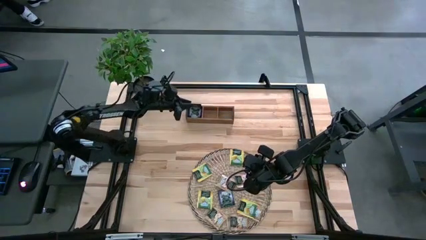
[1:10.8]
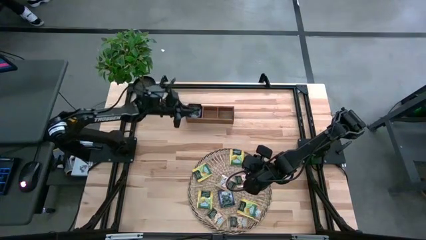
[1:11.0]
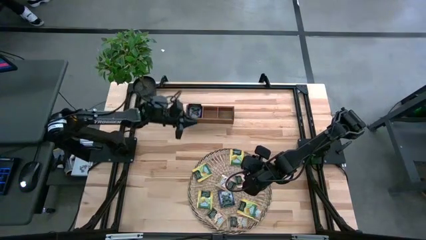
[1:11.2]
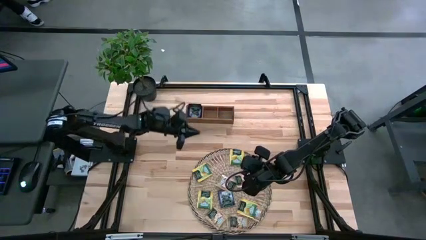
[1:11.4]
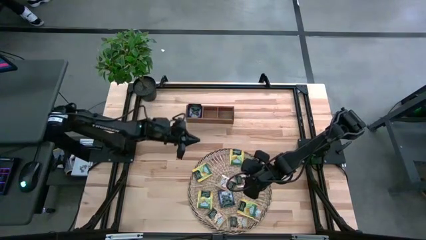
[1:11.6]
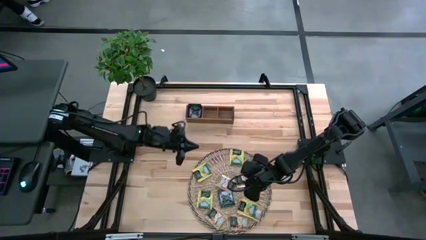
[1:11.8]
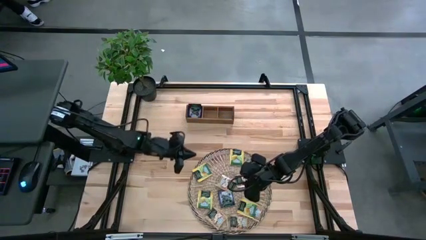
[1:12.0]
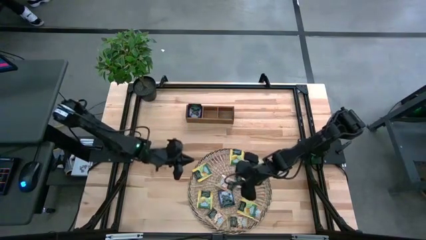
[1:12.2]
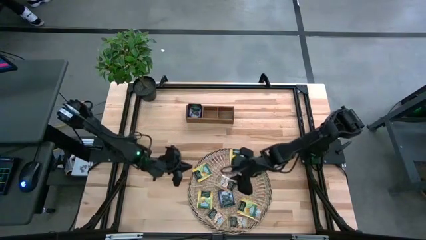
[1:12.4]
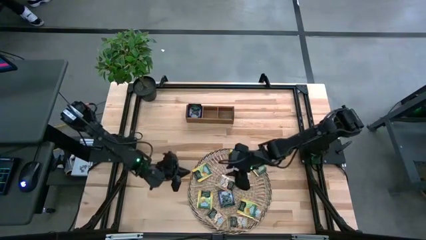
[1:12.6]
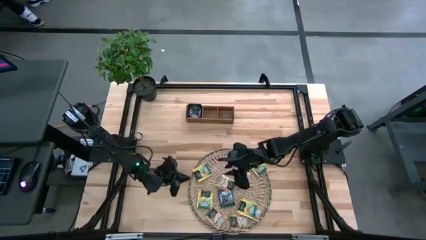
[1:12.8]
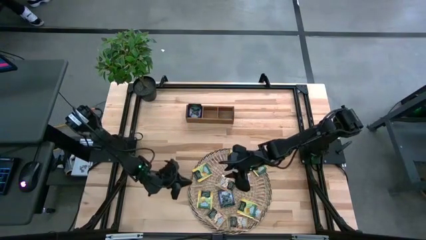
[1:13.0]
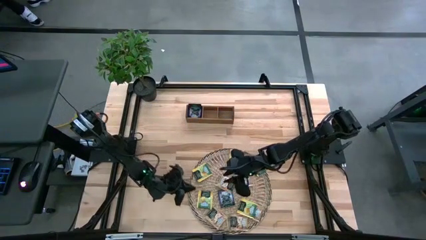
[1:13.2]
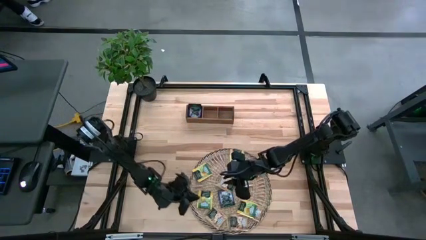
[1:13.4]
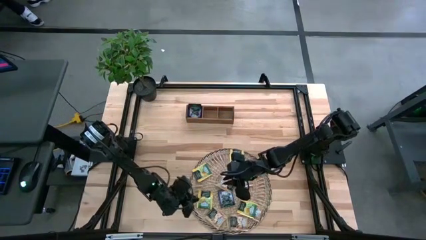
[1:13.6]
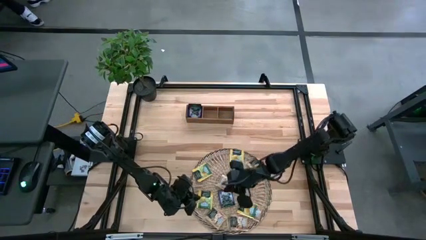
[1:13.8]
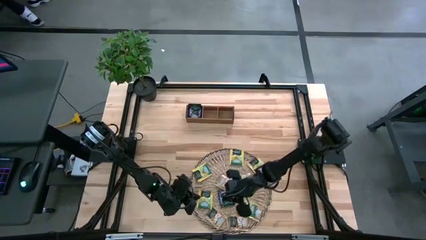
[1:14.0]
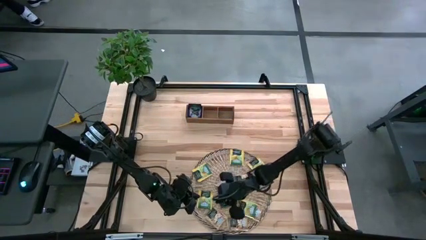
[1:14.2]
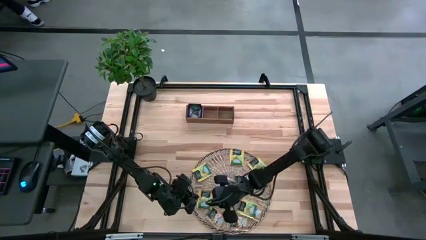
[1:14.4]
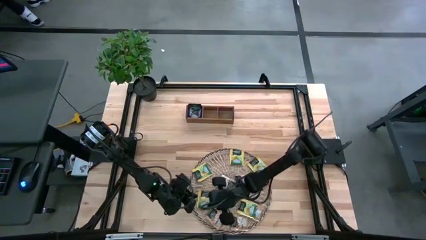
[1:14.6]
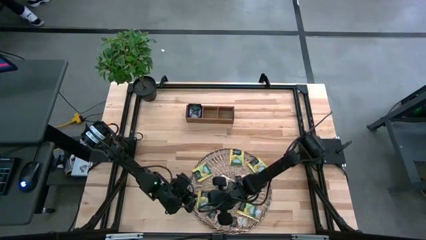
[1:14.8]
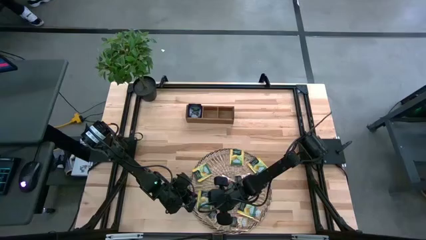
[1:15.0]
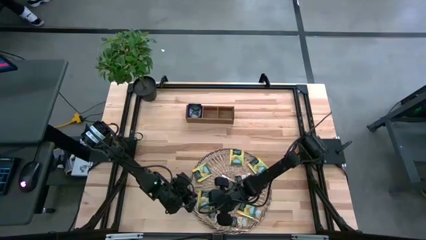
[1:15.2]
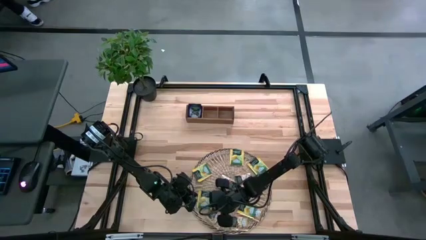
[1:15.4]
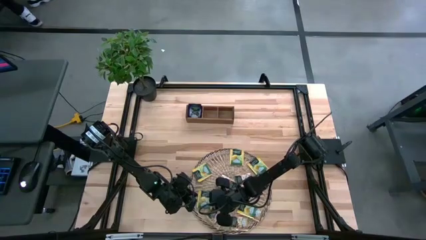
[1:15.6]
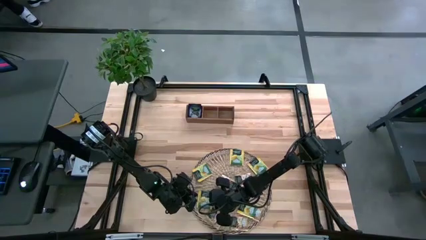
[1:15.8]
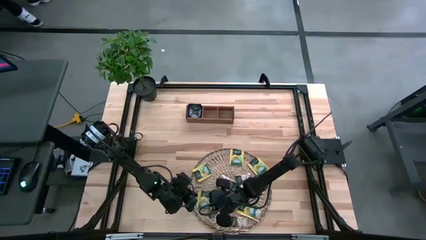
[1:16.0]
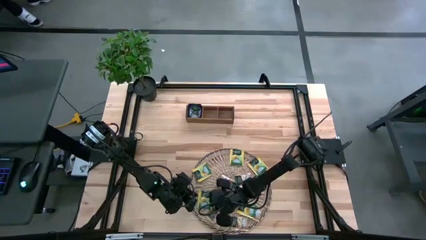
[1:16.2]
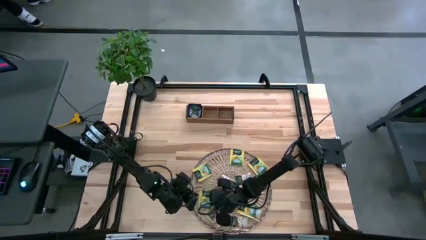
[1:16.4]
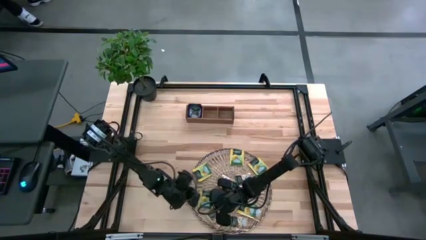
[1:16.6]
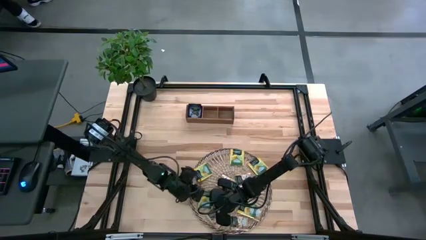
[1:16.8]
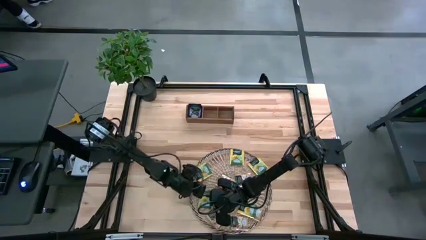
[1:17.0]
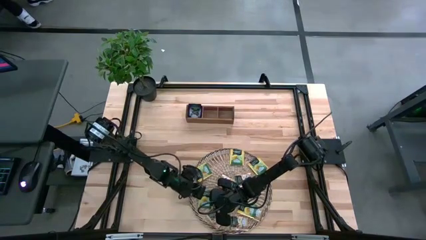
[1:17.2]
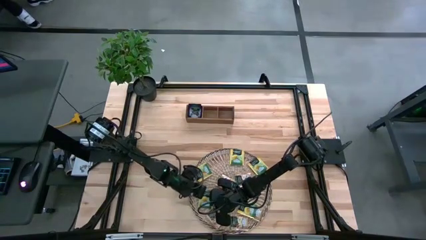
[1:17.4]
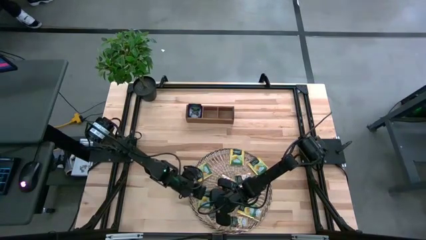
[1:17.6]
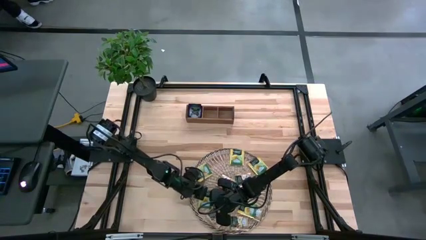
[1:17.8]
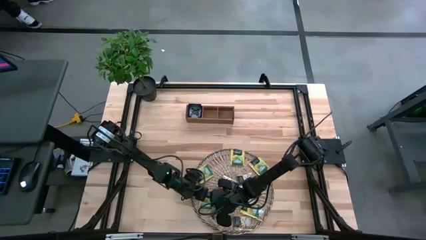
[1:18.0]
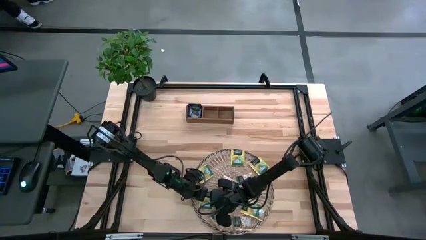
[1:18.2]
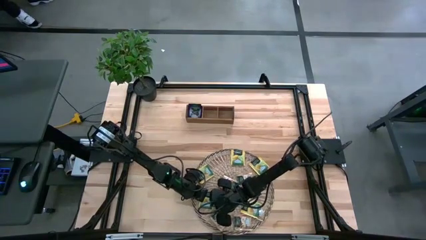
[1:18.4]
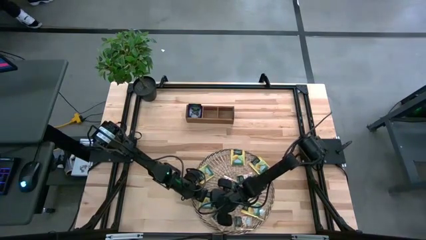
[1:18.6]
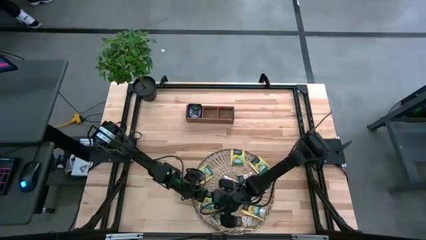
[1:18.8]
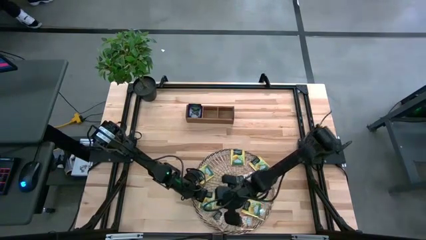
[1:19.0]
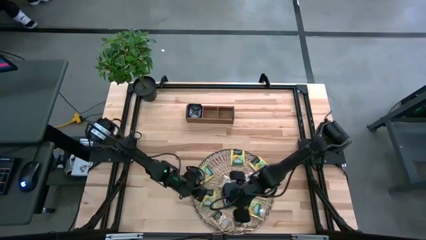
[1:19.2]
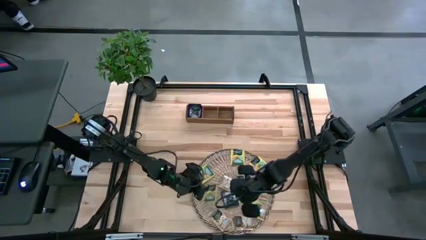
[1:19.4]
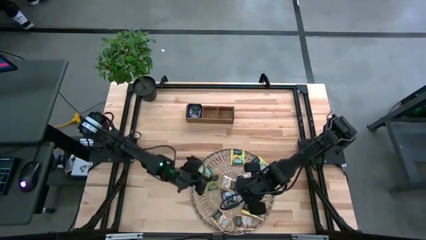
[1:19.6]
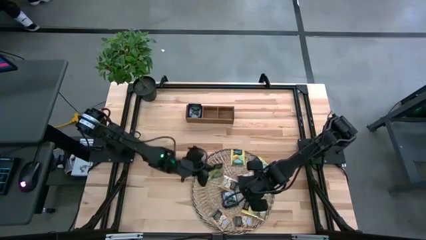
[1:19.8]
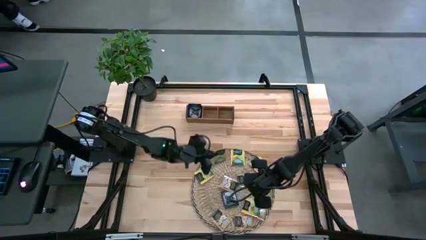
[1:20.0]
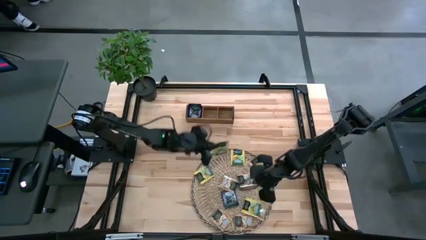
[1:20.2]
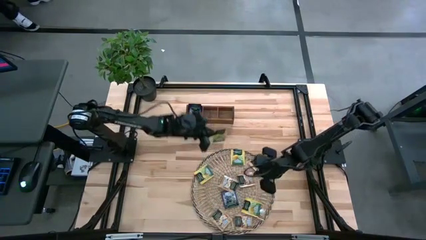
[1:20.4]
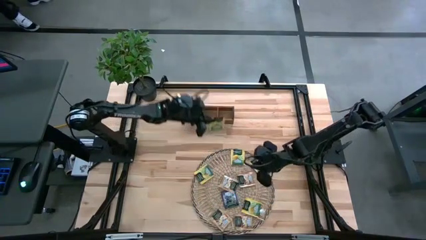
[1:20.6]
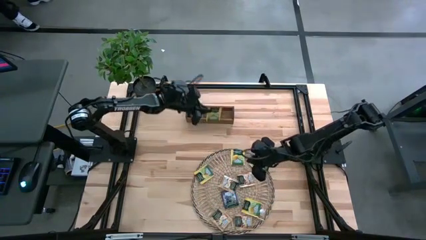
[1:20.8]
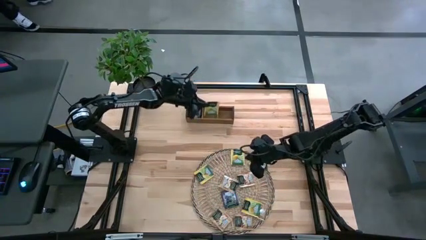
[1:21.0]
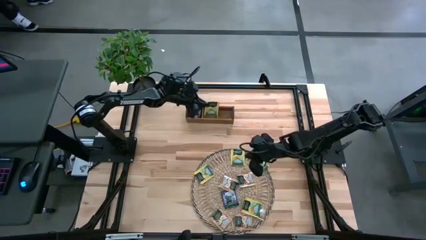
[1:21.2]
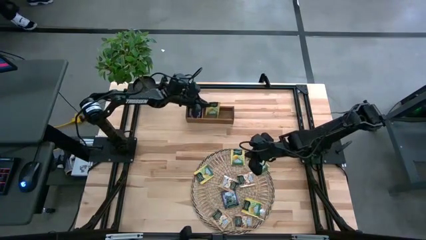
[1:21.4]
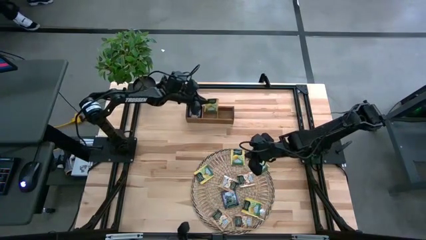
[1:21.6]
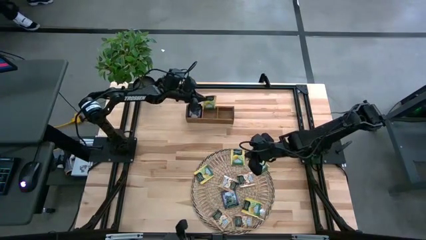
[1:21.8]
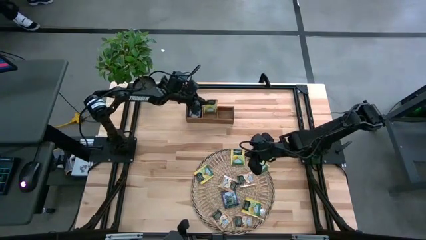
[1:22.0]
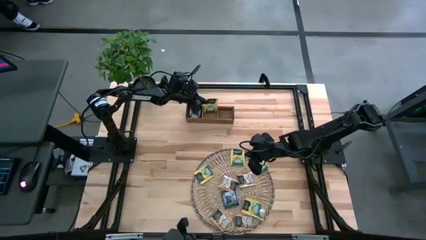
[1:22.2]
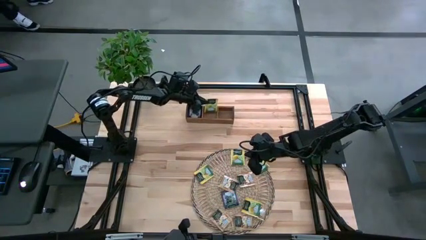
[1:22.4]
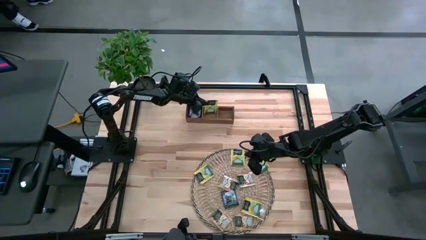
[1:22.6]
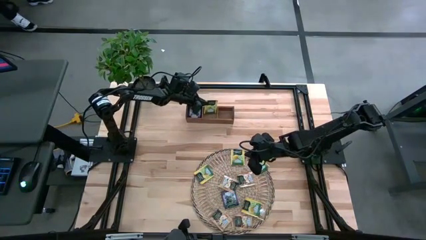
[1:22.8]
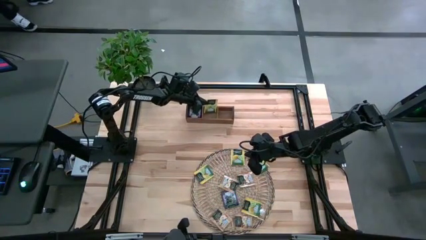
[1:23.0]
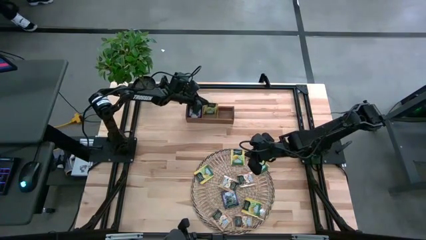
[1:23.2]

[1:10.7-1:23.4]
Task: Pick & Place Tea
Put the yellow tea bag in the middle section of the wooden organizer

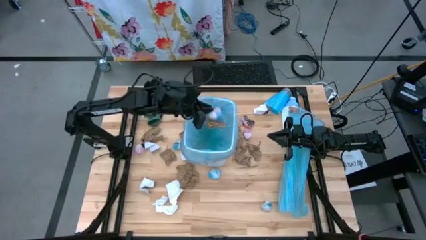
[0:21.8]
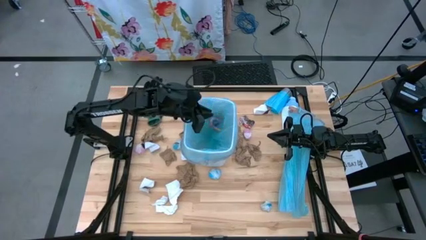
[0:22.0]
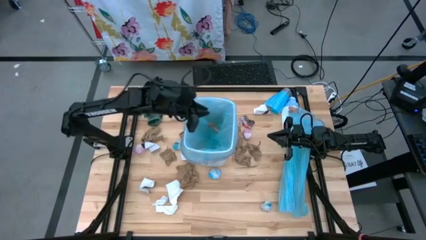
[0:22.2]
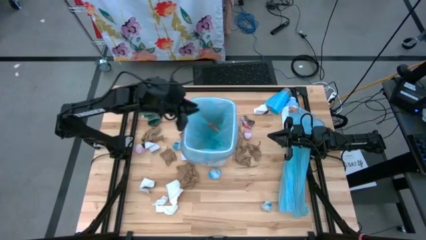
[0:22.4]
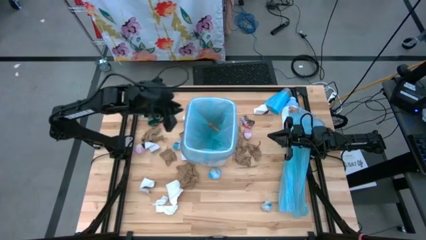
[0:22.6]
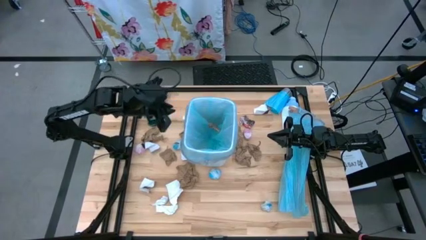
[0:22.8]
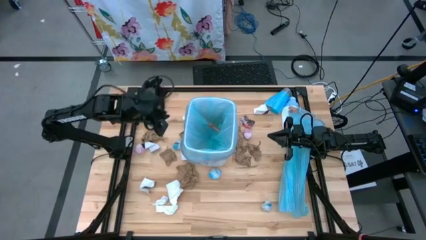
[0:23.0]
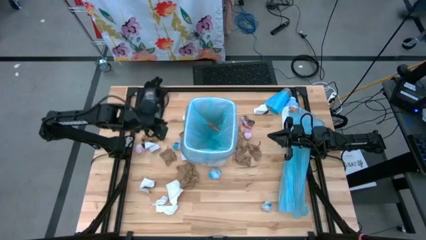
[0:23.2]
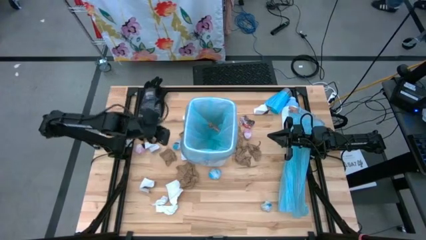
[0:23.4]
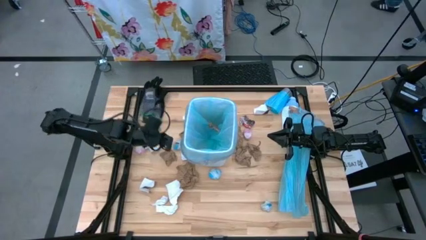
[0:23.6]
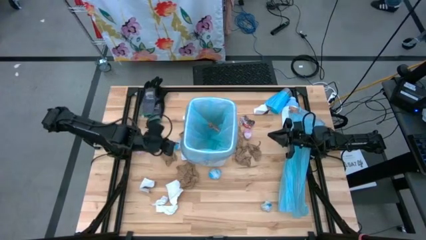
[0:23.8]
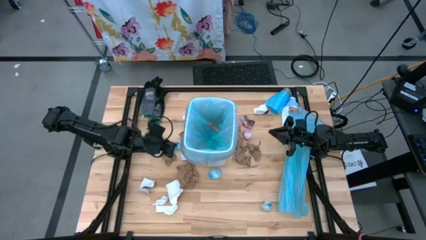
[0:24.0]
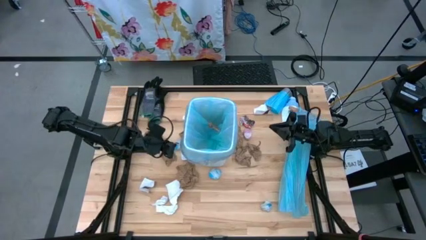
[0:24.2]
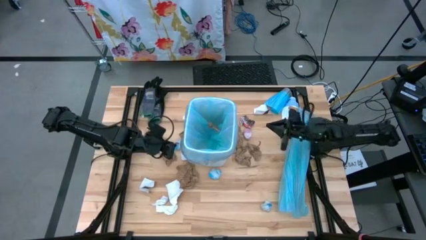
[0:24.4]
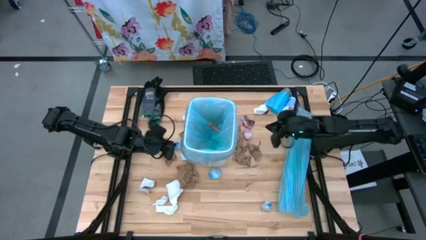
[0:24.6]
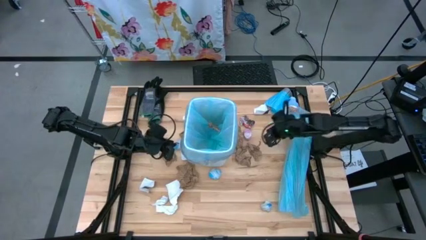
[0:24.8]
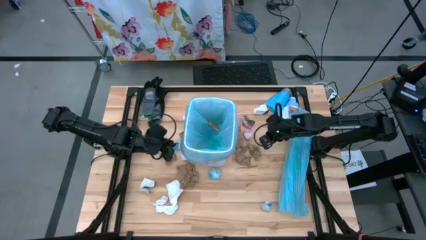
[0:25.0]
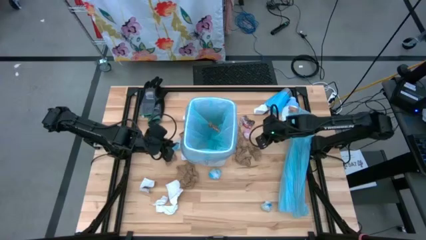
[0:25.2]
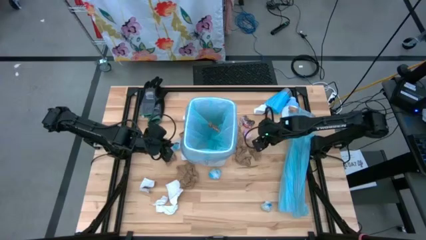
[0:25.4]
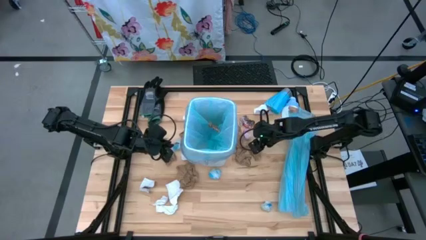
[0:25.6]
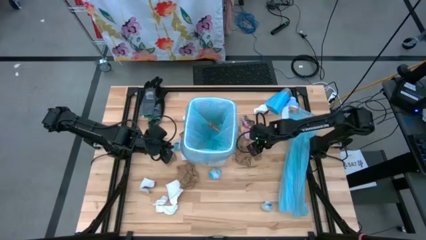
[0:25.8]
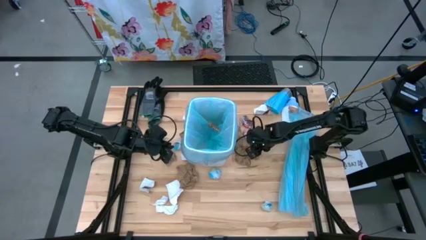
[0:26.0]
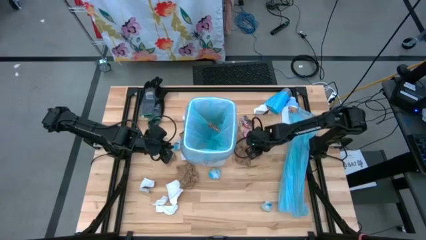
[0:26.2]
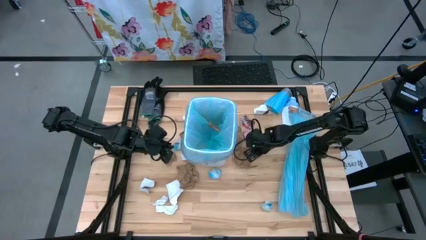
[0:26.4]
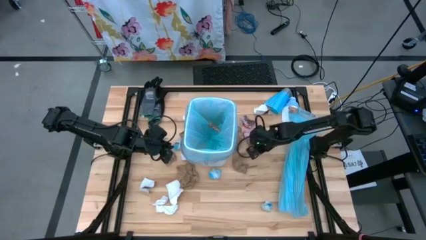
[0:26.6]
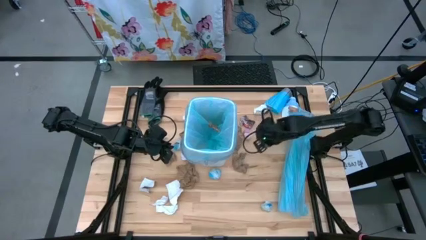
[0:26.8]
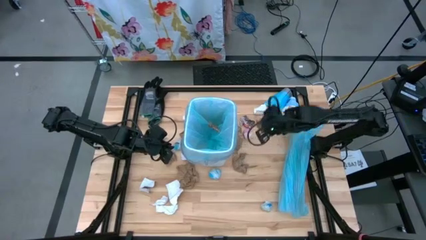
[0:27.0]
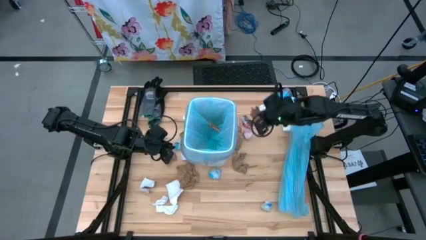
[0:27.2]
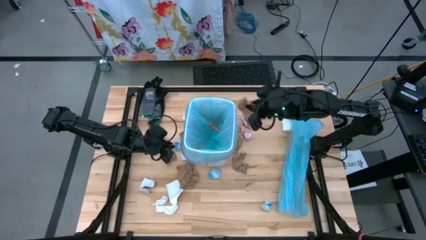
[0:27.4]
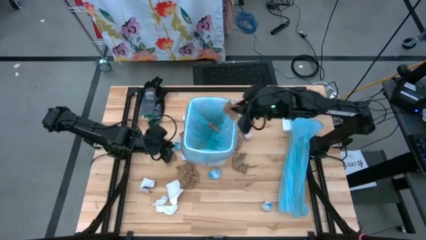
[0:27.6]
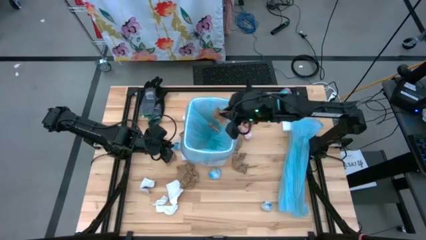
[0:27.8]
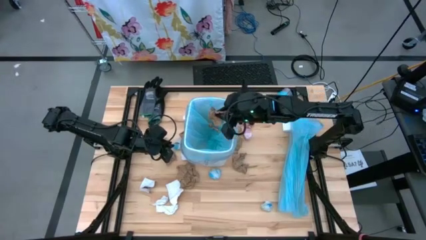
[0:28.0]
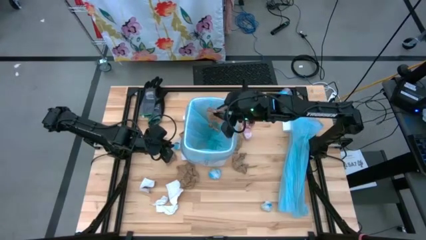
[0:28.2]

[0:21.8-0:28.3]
Task: place trash/remove bag and relplace
Put the brown napkin into the trash bin
